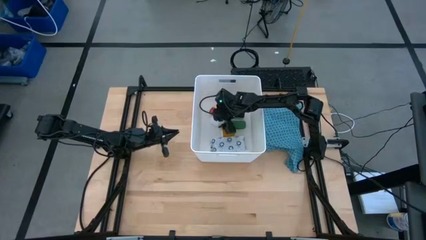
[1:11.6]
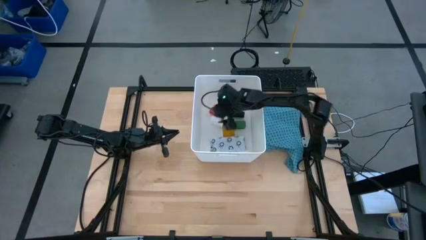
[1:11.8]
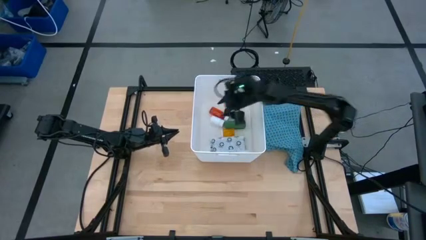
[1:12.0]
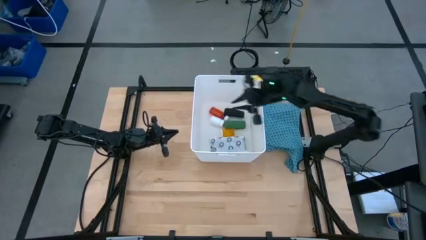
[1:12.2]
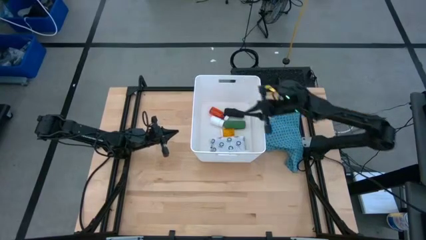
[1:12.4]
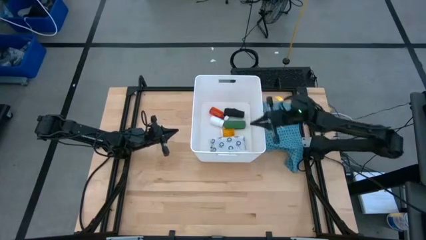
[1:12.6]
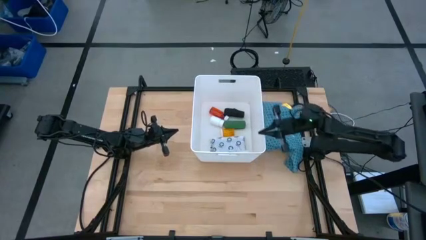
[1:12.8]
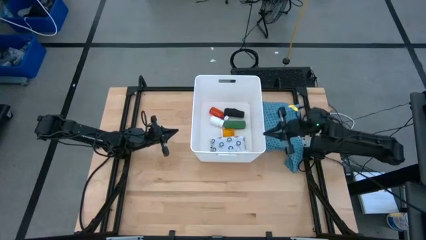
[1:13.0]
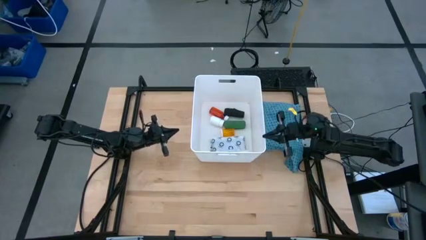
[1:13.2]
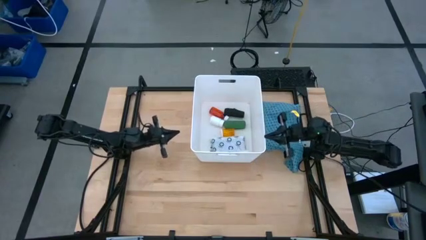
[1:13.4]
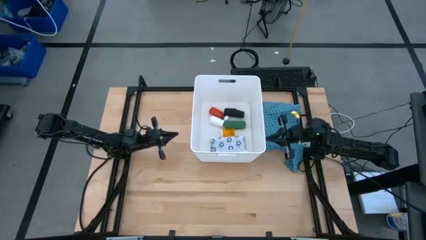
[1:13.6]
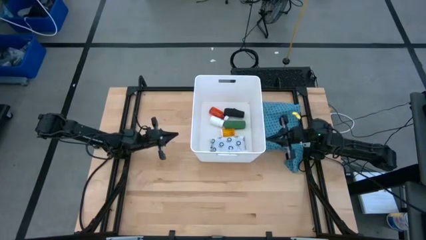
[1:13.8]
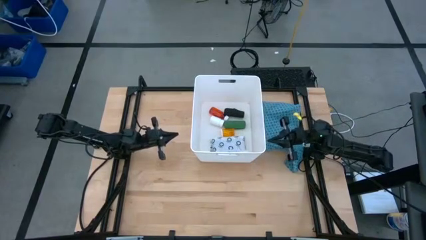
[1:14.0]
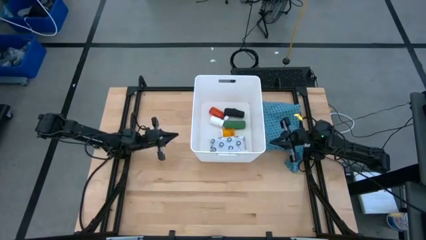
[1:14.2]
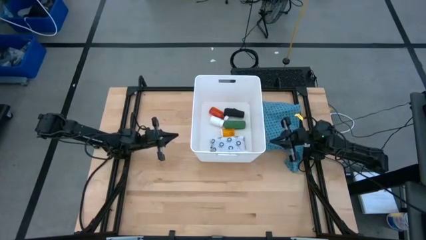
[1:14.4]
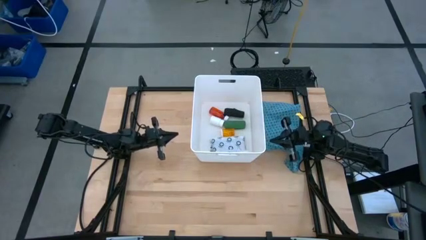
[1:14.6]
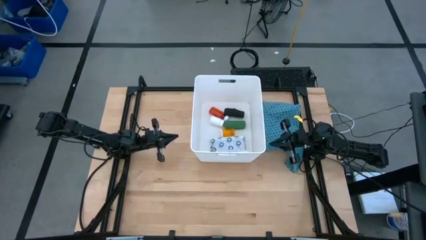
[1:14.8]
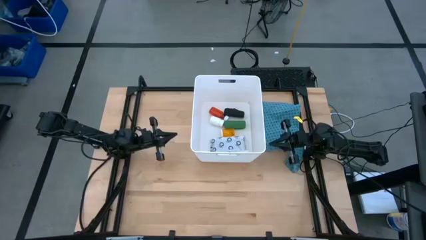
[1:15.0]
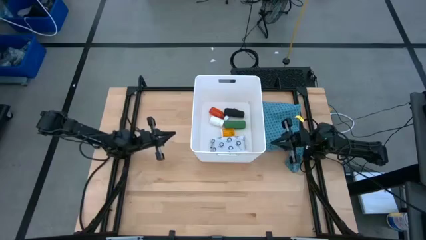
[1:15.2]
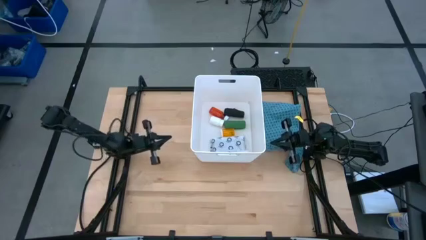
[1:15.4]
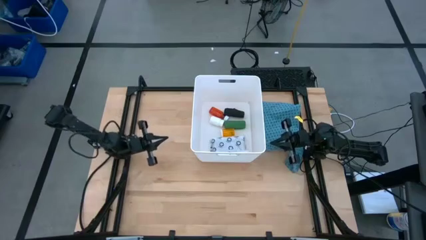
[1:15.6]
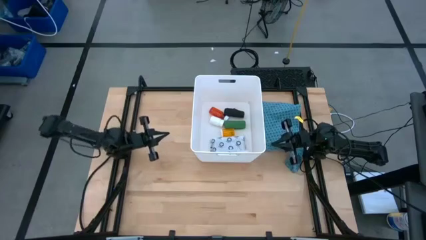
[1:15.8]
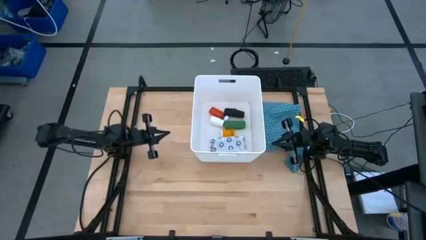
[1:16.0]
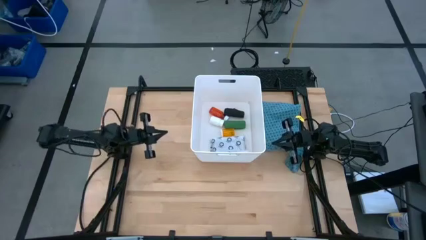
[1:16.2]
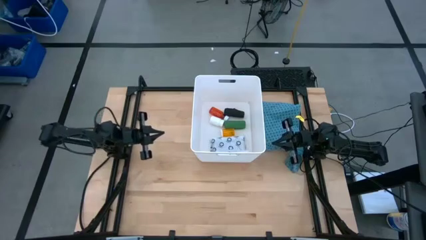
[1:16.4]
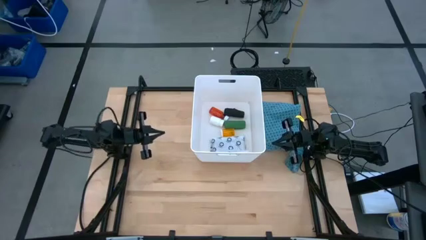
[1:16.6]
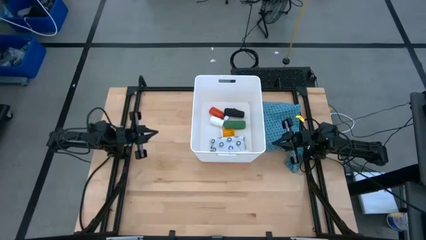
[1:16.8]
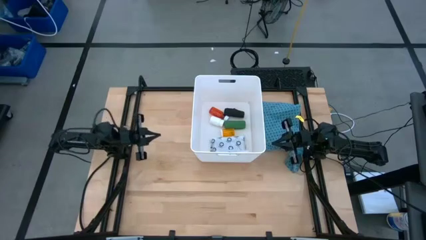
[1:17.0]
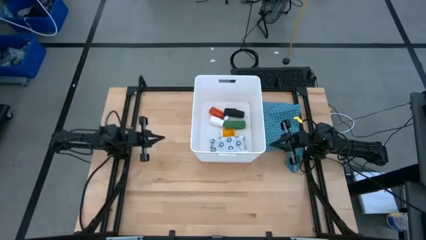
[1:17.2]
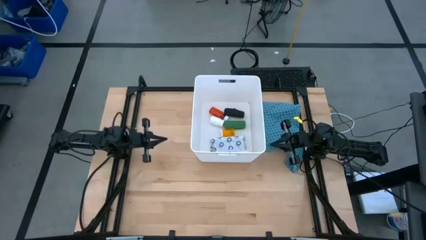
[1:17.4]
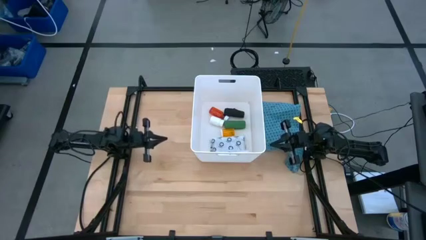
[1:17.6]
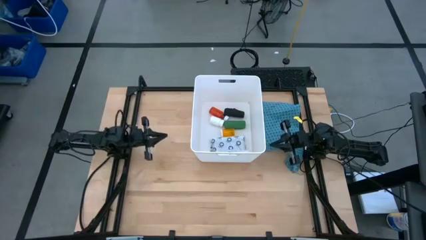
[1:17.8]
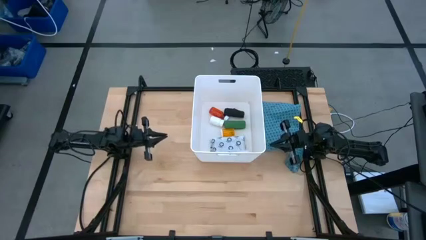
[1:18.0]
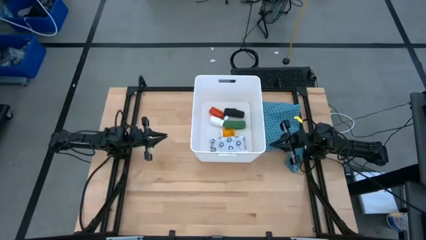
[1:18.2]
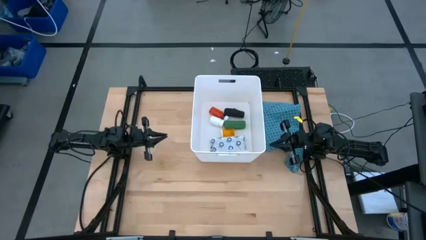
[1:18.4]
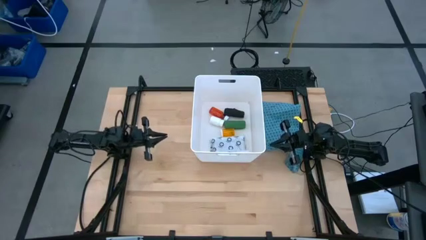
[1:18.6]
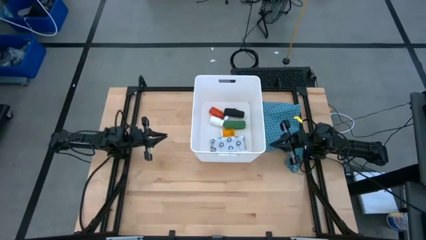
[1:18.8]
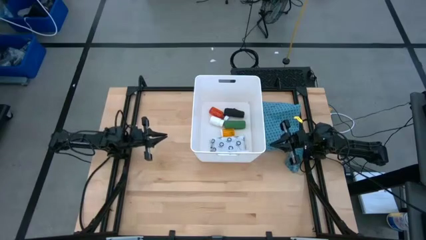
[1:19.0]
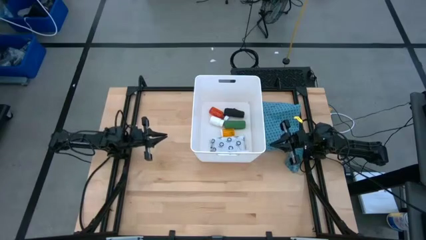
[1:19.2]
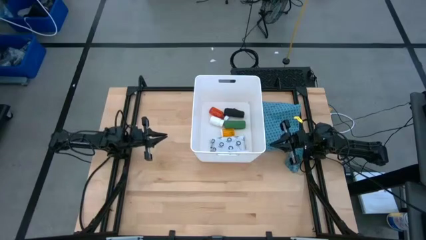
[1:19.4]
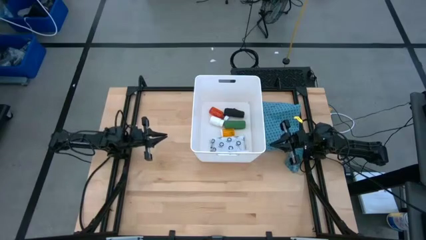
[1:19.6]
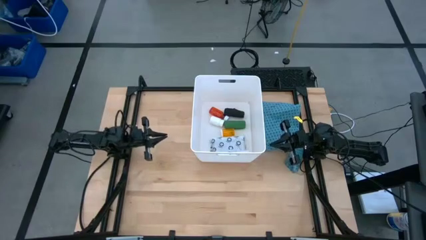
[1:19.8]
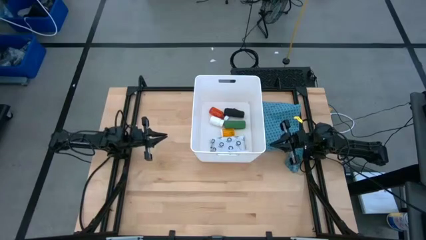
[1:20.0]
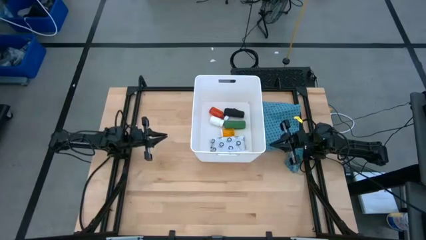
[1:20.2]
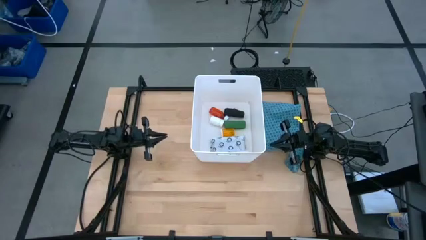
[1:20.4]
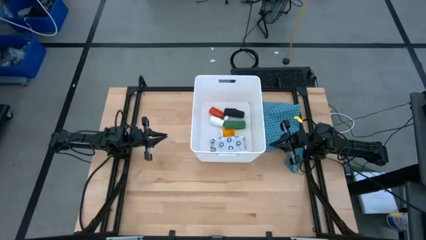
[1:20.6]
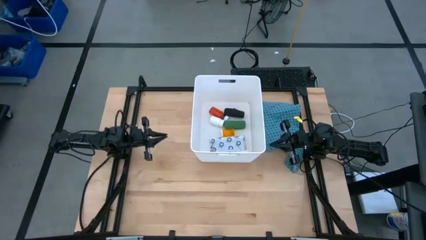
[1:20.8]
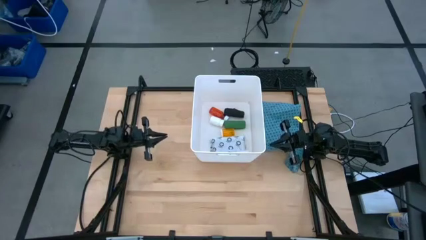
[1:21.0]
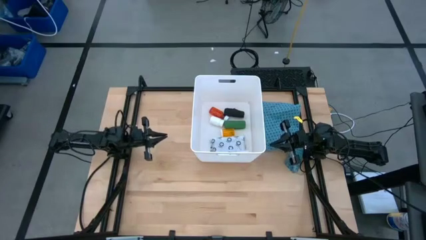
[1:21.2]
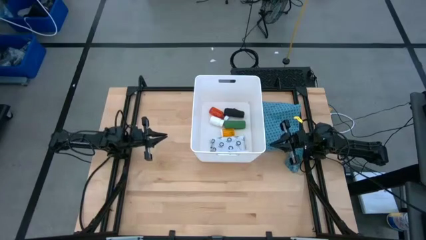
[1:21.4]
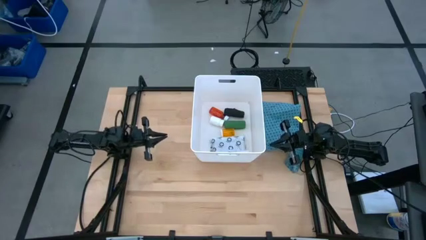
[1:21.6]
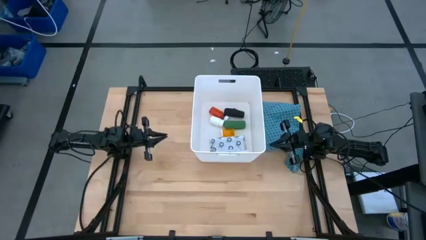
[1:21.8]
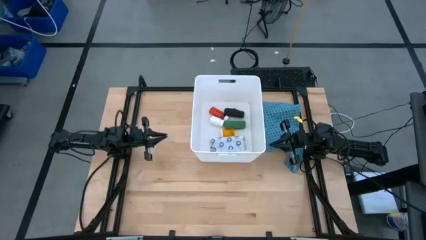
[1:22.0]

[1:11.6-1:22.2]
Task: Pick & place medical supplies in basket/bin
Return to Home Position
